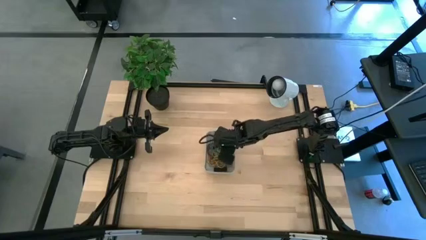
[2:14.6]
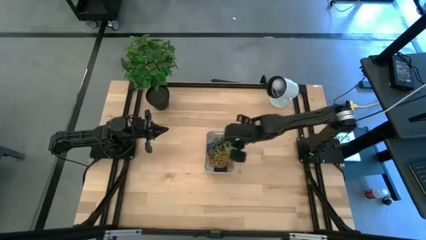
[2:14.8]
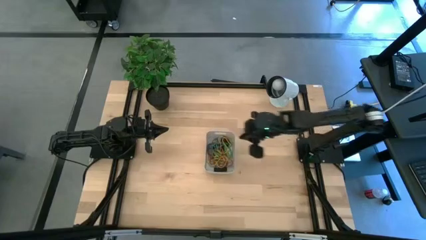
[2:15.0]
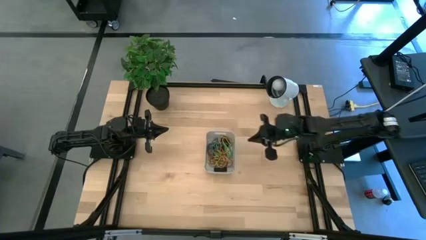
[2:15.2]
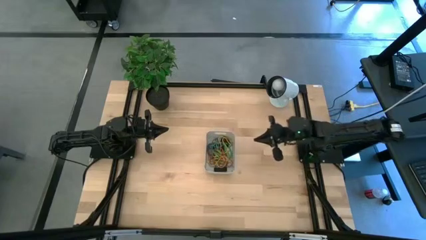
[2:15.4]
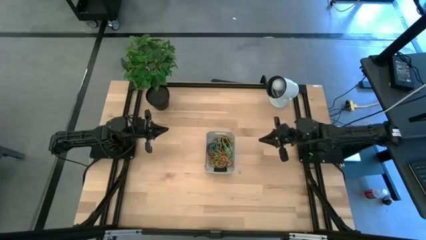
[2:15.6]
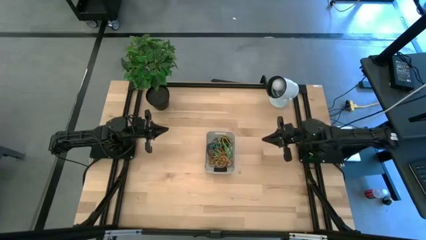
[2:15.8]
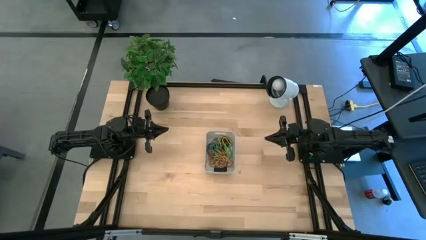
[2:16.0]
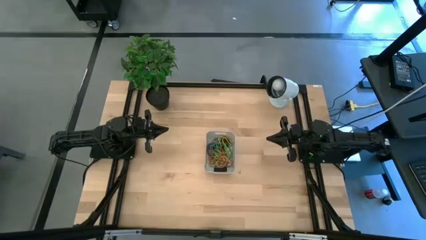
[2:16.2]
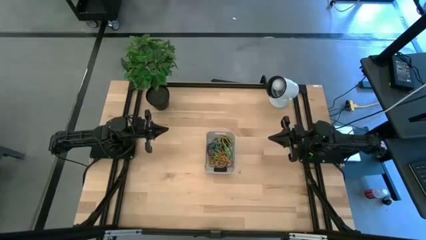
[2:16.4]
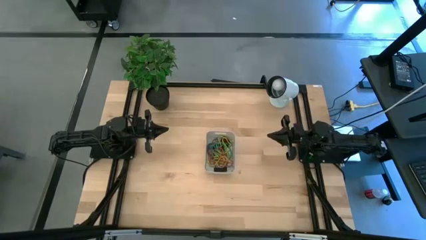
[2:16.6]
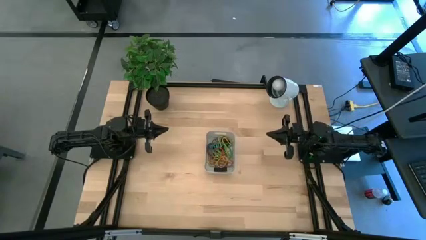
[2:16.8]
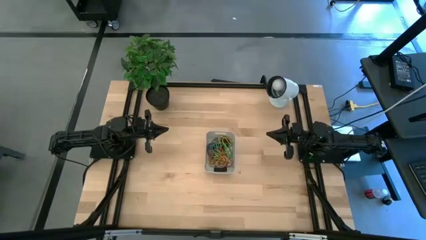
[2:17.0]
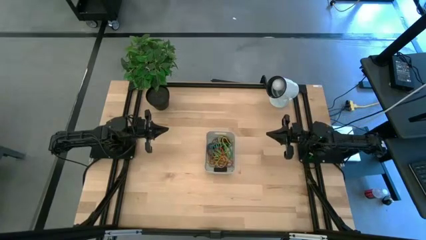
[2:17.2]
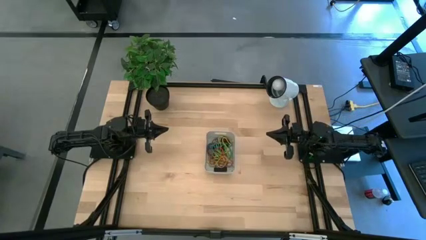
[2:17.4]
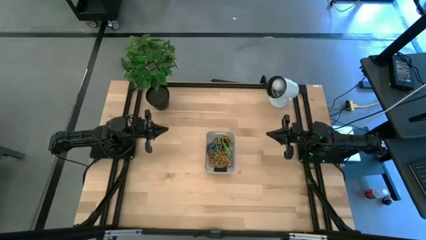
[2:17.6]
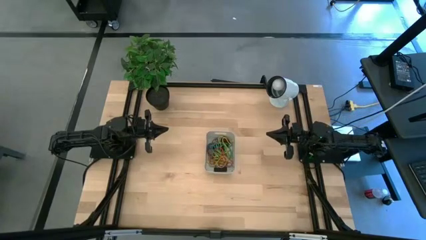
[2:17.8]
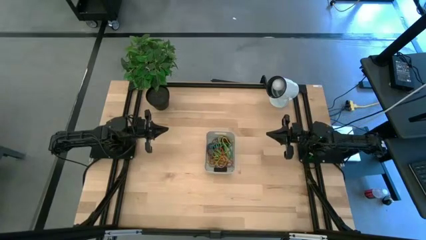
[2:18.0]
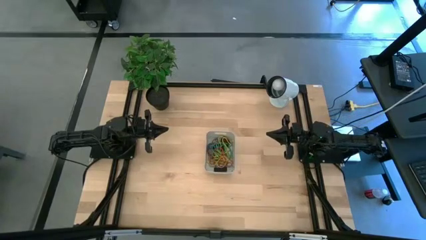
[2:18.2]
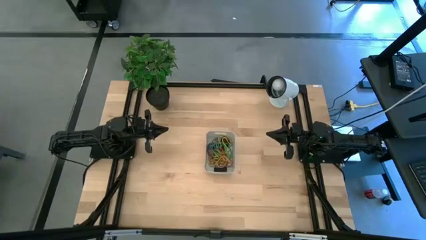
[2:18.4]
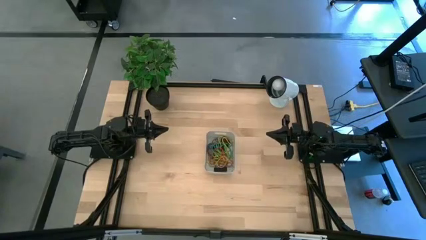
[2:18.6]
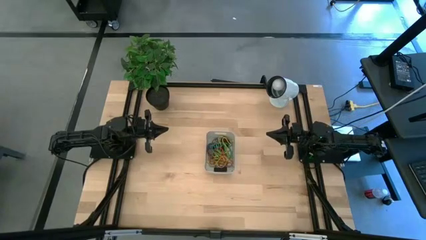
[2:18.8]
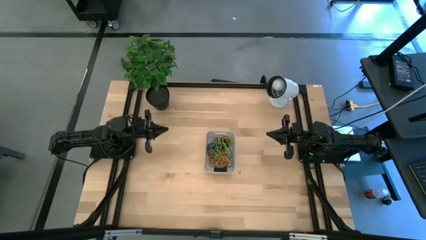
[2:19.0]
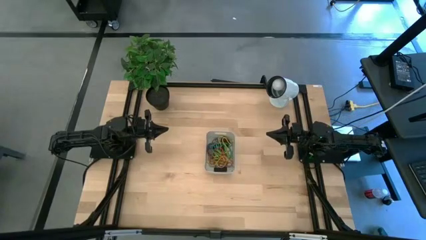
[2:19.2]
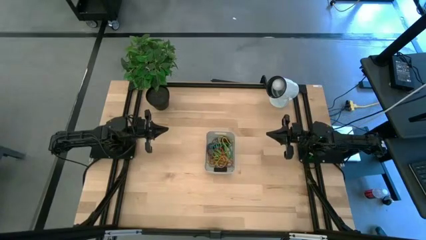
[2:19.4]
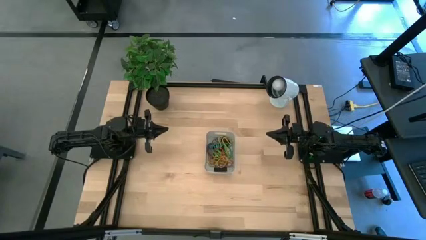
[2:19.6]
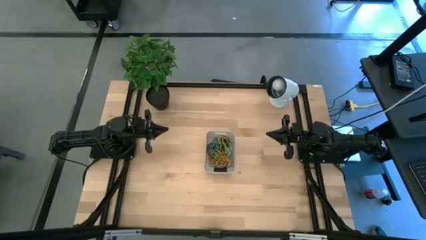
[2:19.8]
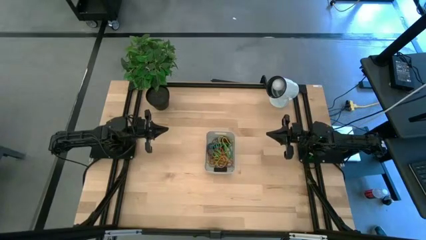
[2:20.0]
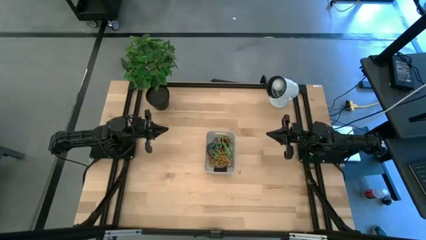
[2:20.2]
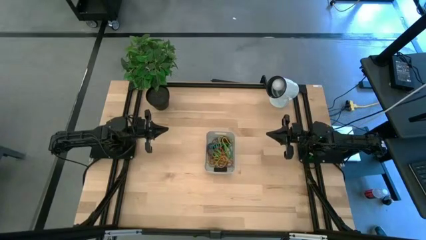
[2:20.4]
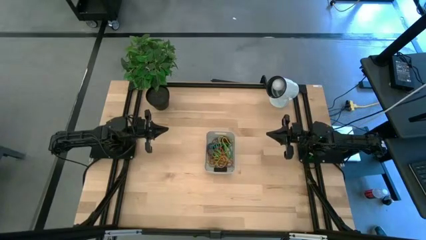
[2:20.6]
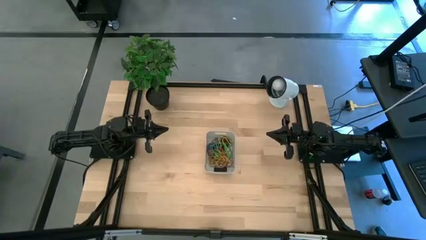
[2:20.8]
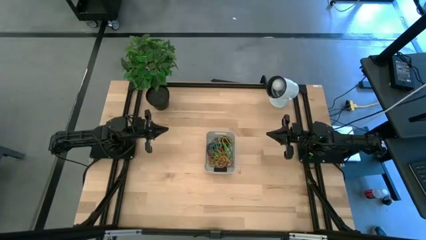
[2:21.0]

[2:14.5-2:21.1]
Task: Pick and place rubber bands into bin
Return to Home Position

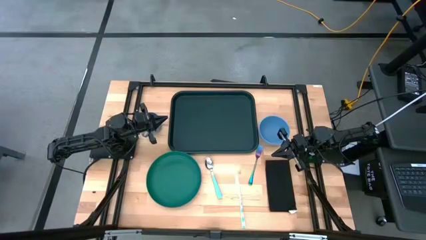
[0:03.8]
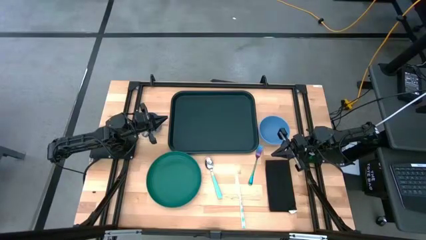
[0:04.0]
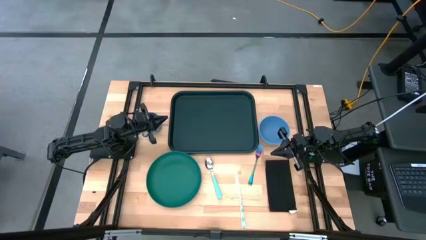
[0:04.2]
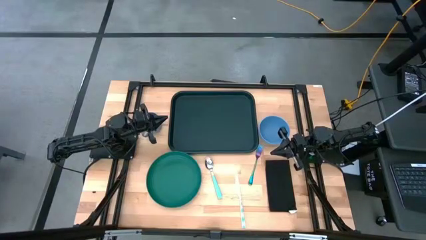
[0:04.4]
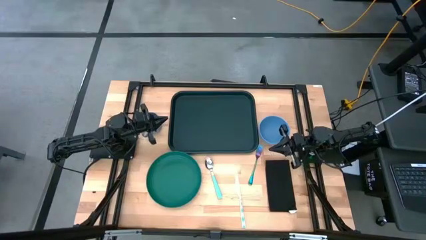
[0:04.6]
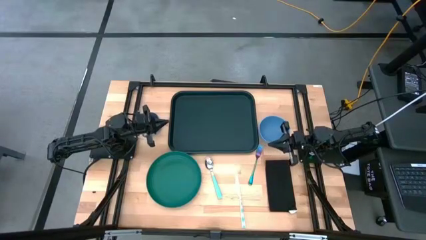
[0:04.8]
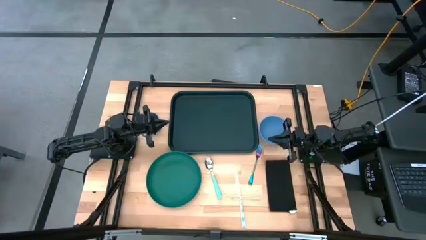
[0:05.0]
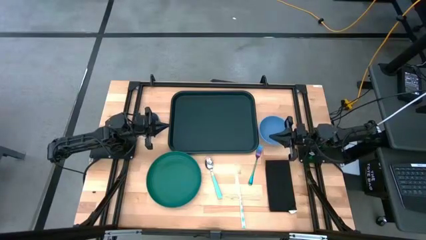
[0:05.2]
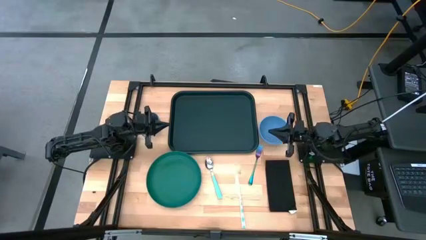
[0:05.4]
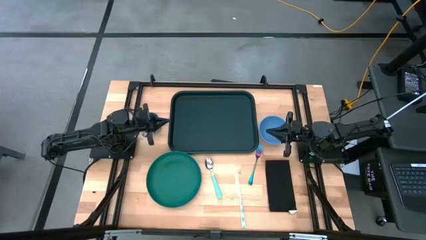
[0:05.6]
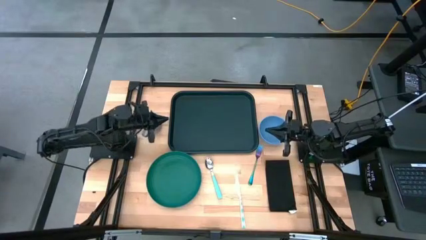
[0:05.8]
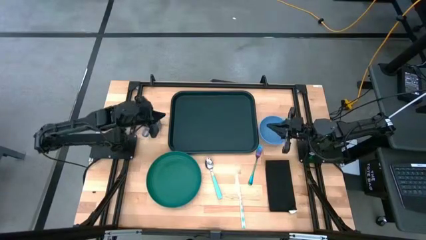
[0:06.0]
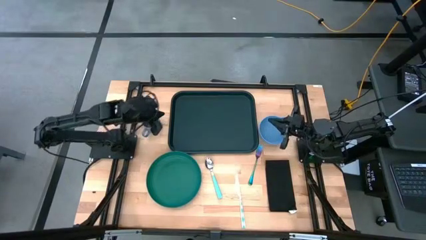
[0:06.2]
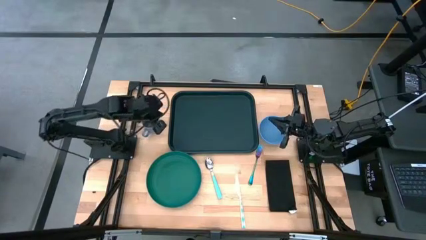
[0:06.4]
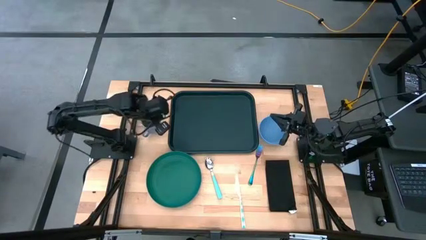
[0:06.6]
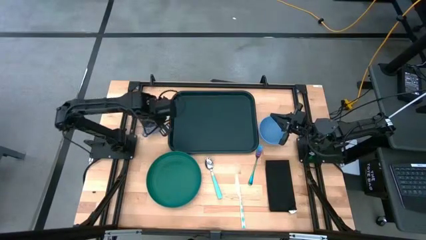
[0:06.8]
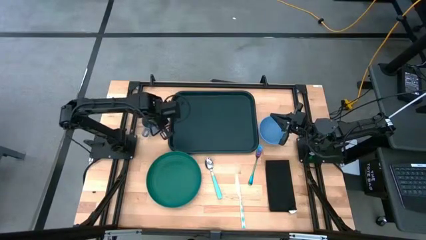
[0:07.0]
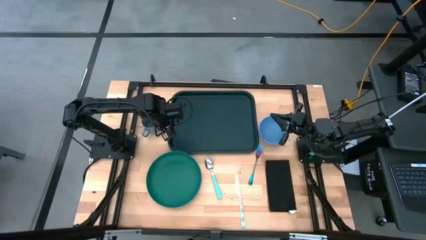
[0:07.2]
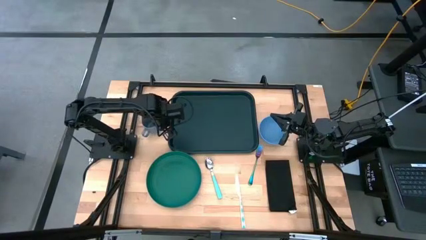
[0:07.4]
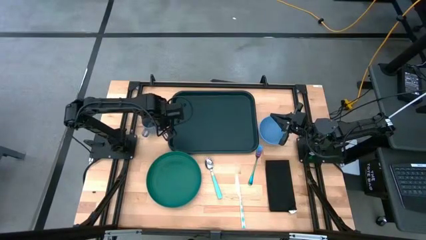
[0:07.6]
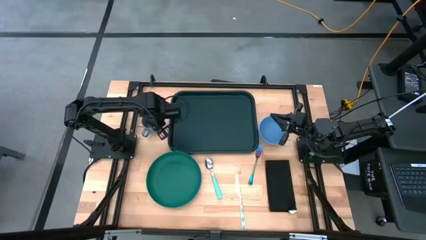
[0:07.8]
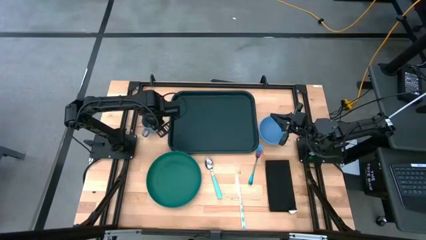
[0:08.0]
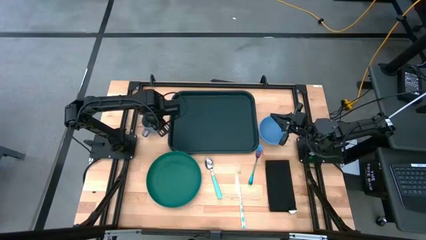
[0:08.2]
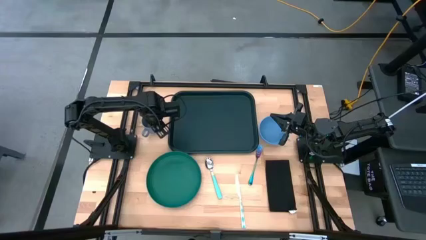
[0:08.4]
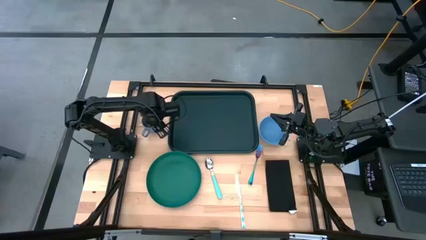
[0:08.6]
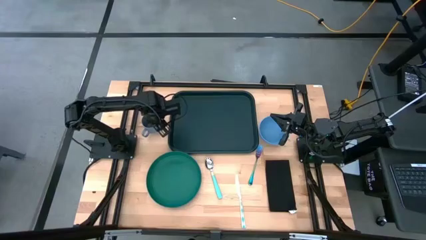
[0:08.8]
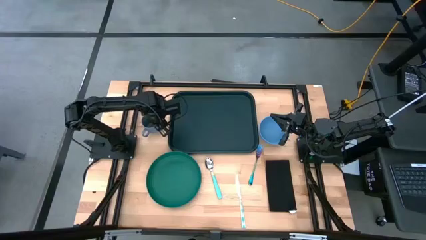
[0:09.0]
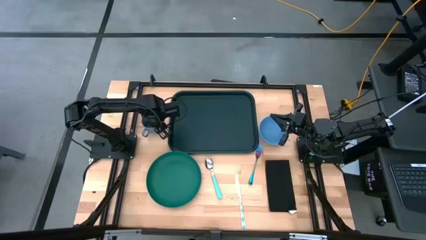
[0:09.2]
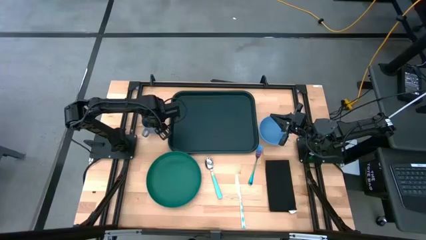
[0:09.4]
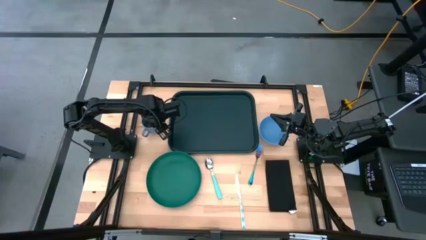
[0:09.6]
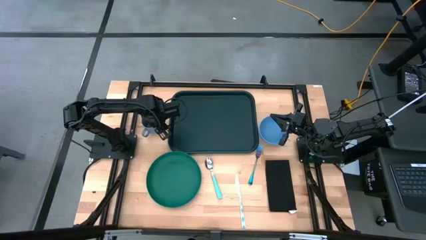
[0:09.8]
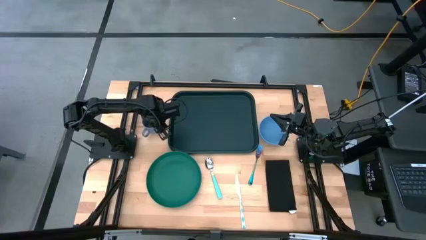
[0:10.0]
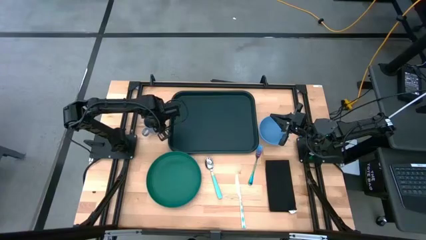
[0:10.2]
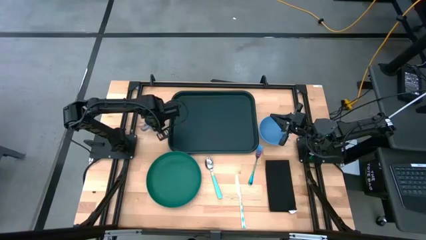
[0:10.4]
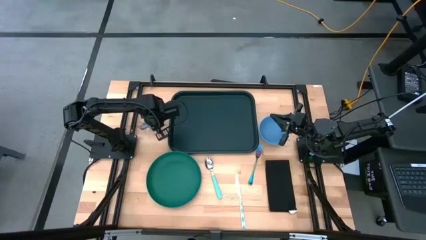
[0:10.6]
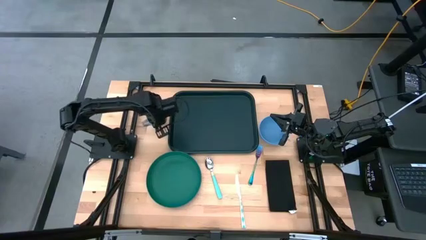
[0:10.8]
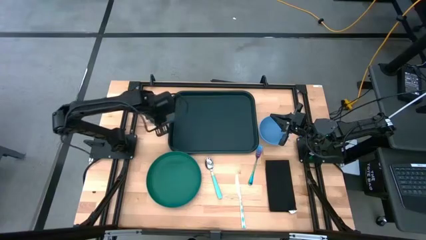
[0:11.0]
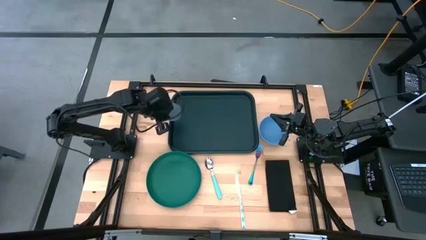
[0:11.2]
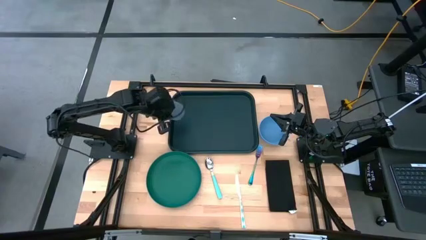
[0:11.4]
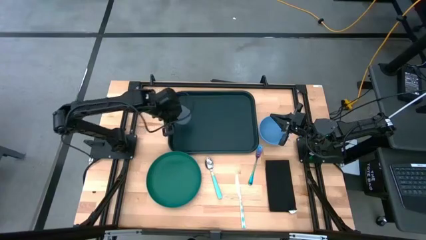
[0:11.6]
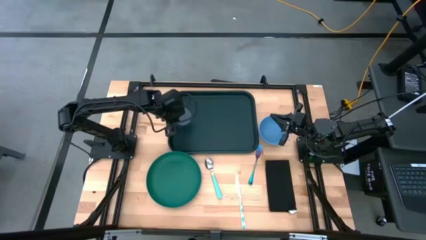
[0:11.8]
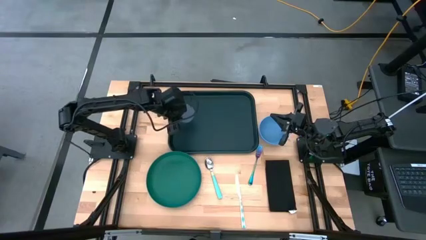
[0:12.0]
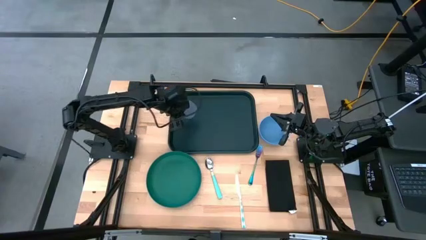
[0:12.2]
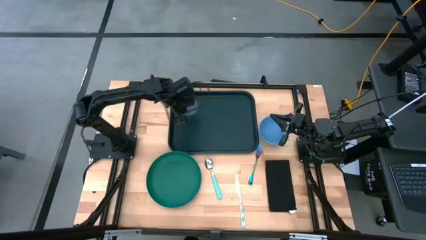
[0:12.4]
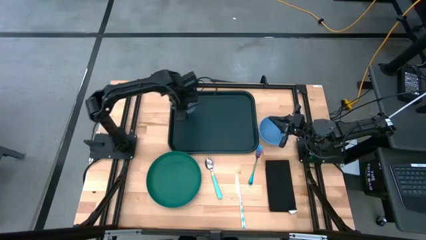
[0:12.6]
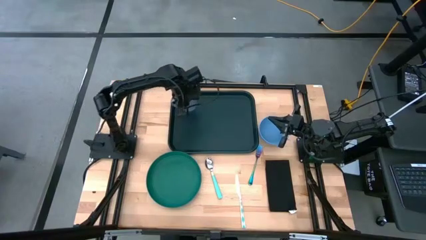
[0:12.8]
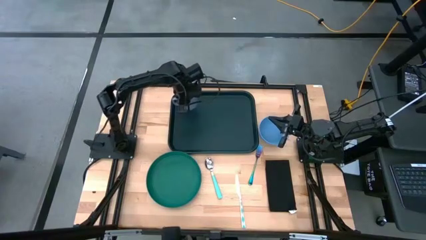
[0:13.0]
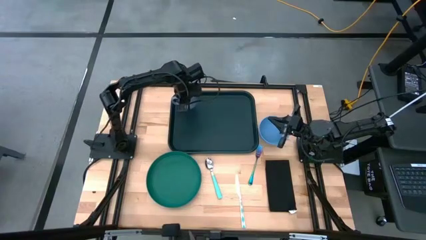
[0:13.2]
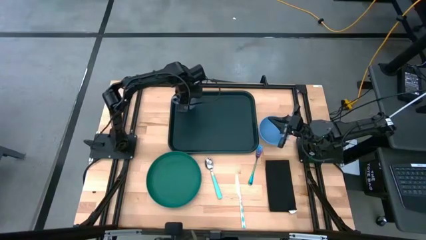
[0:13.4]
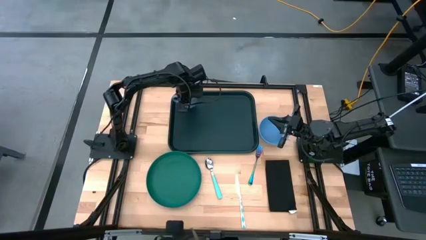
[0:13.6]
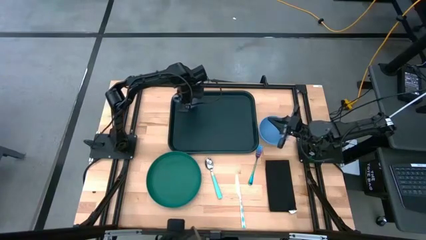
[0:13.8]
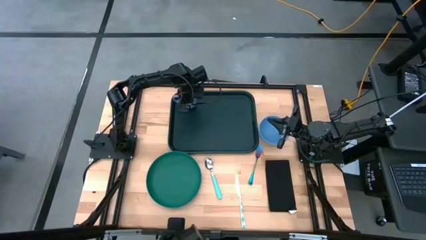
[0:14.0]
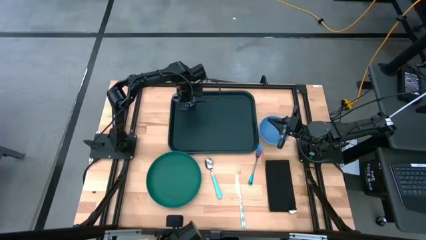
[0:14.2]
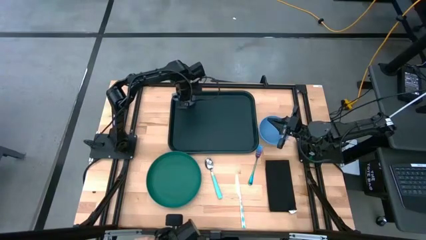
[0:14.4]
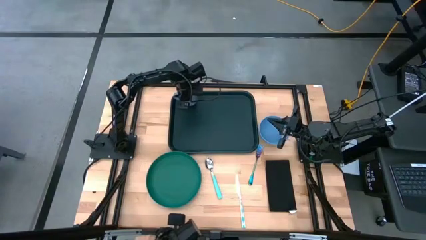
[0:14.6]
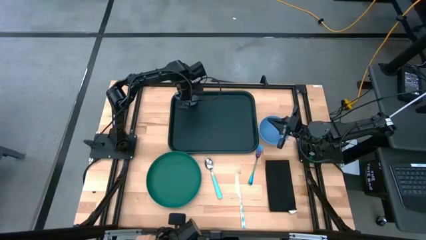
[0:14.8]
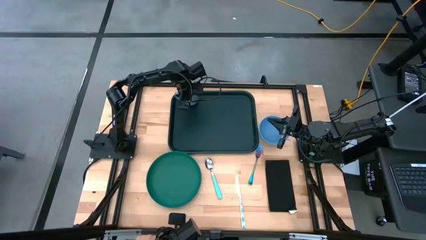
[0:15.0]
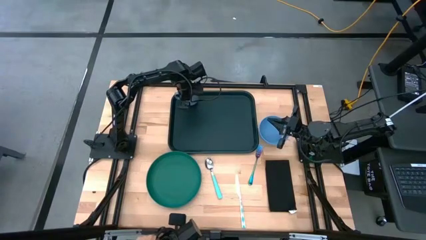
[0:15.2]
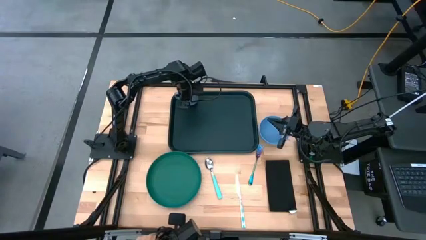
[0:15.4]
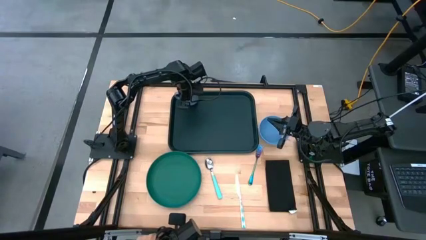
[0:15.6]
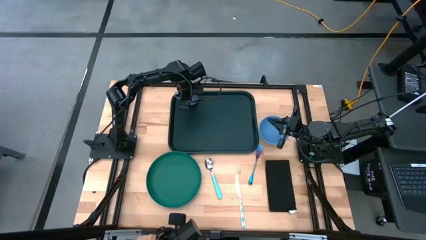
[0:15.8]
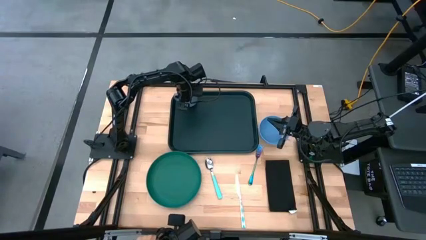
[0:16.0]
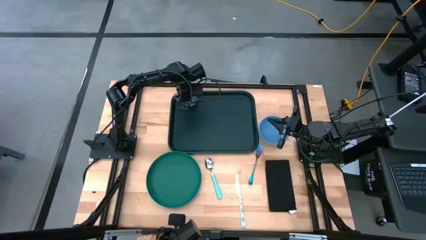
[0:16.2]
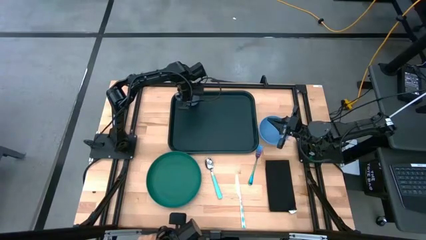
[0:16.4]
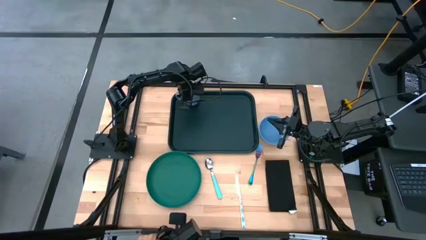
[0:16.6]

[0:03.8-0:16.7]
Task: Set up tray
Put the light blue mug in the top left of the black serving tray
